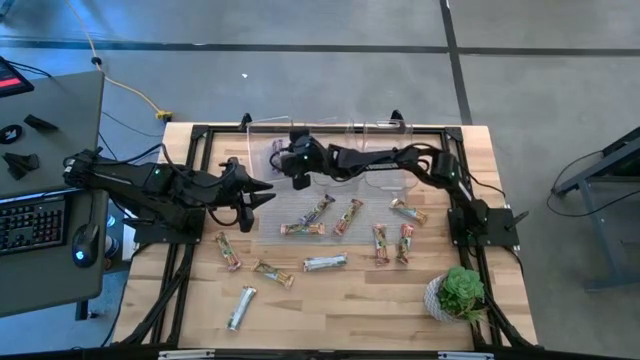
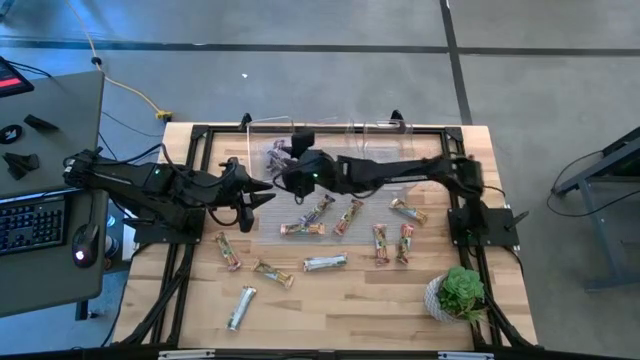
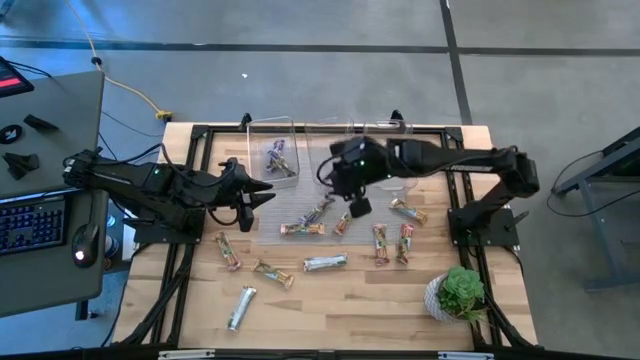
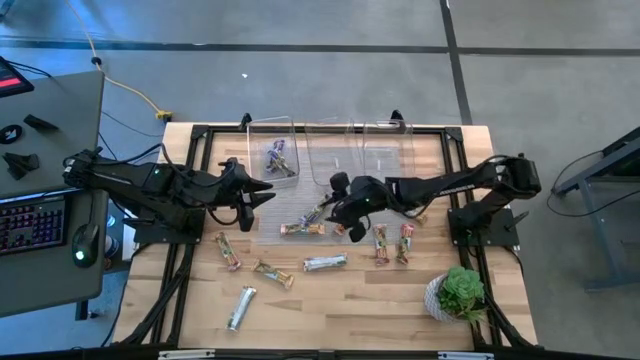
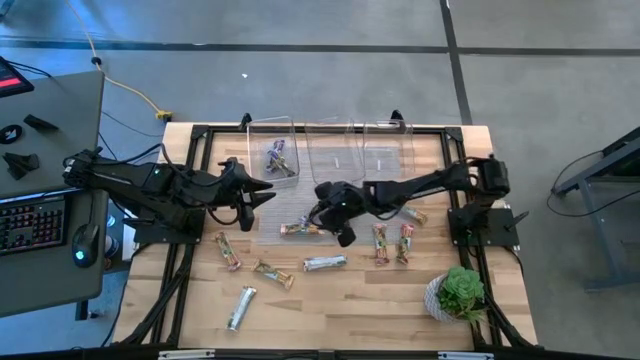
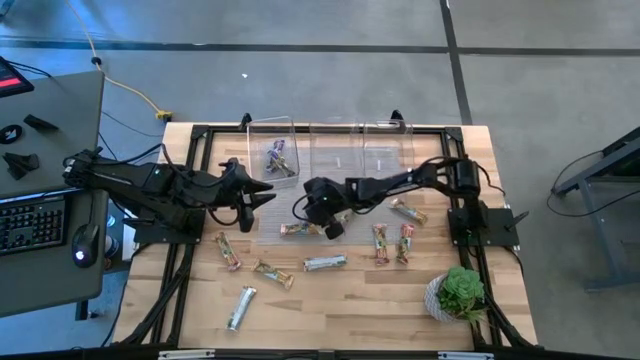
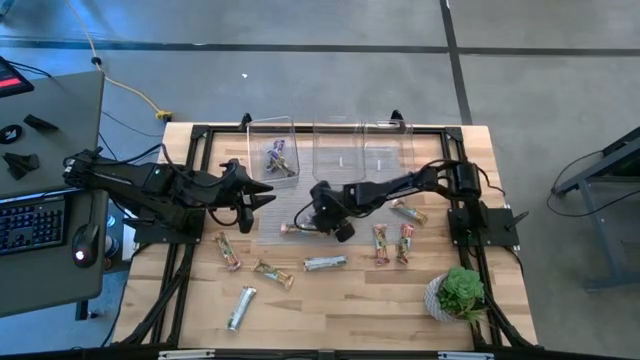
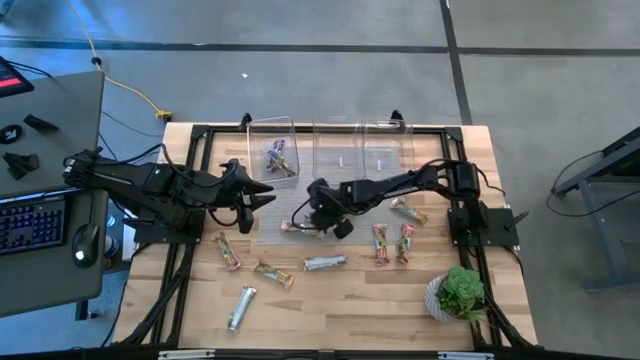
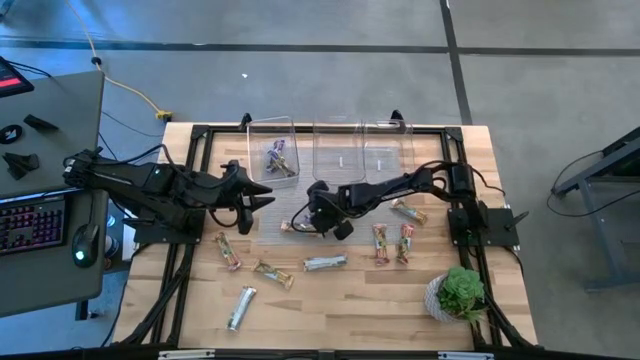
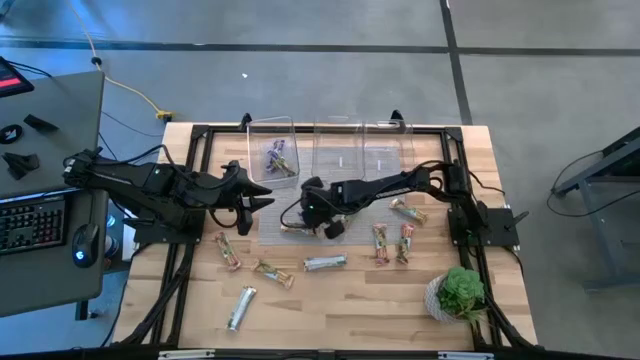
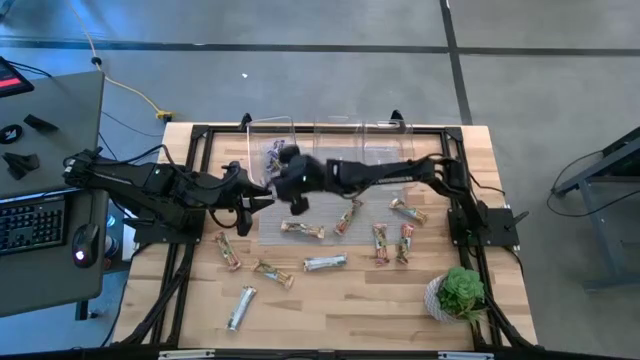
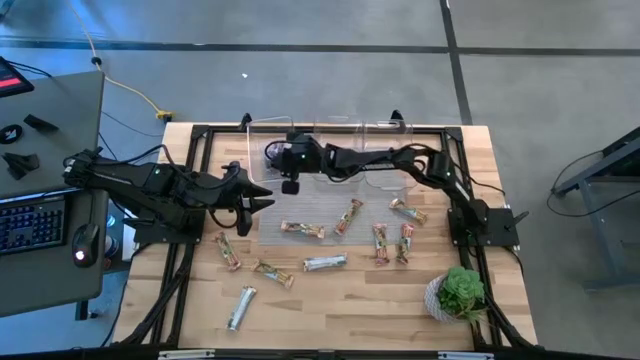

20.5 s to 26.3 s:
Task: Pick and place Granola Bars by type
Put the blue granola bar into the left transparent bin

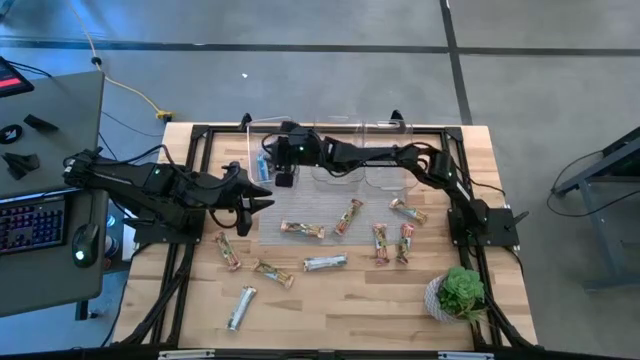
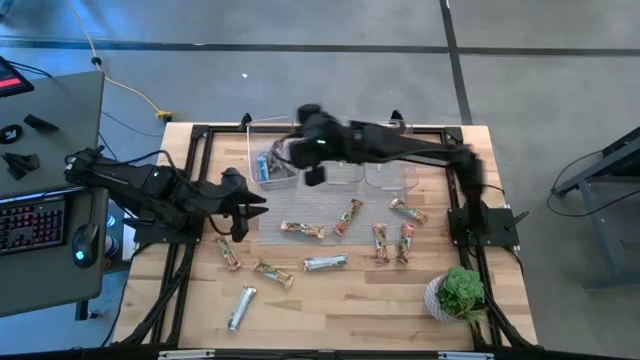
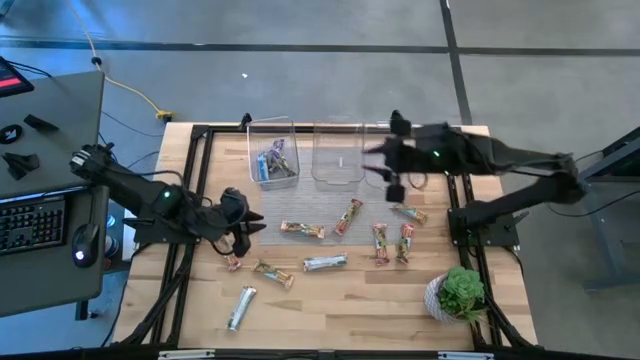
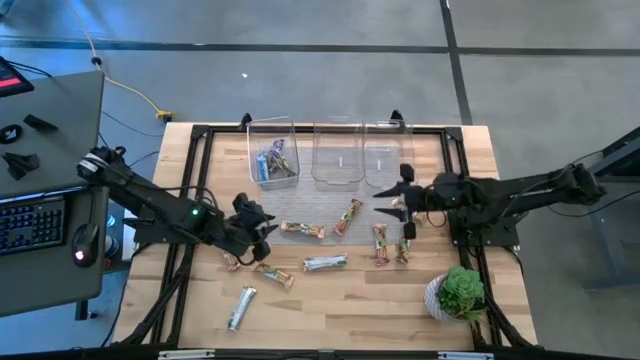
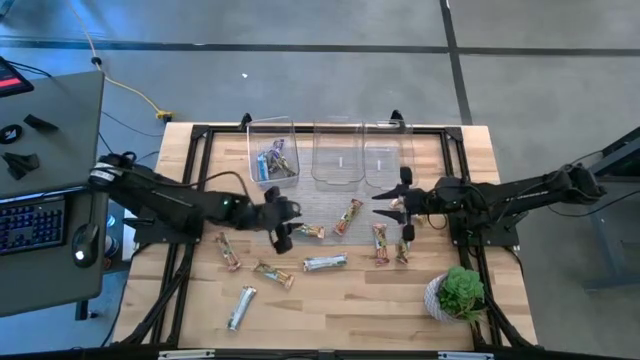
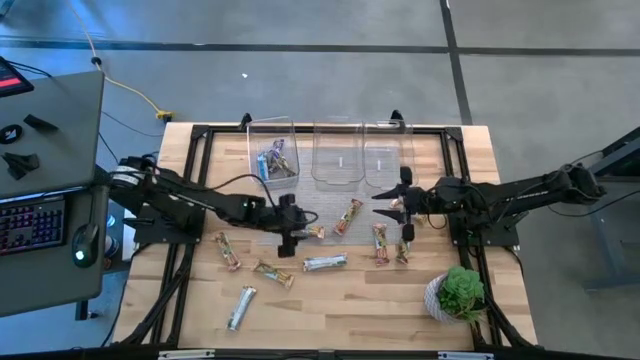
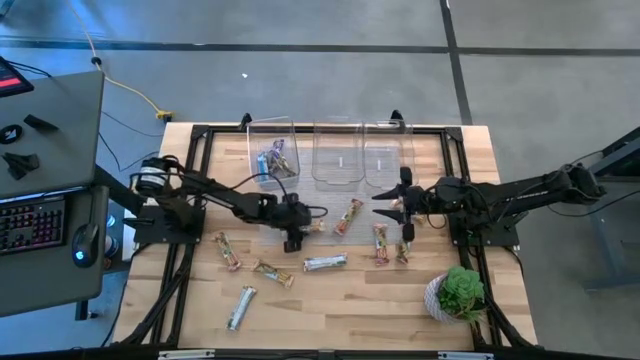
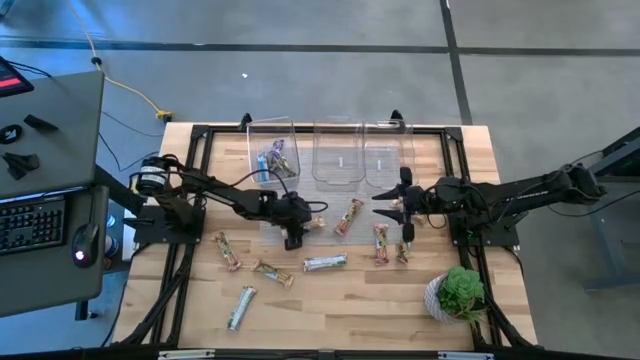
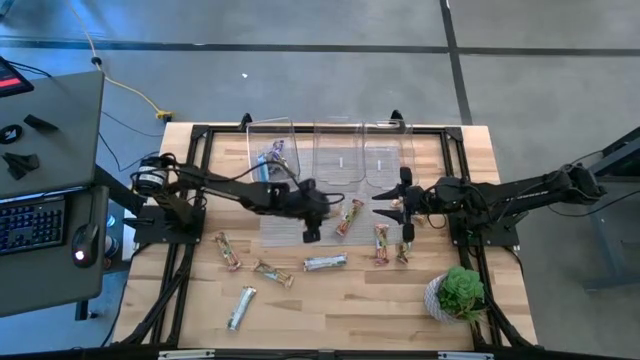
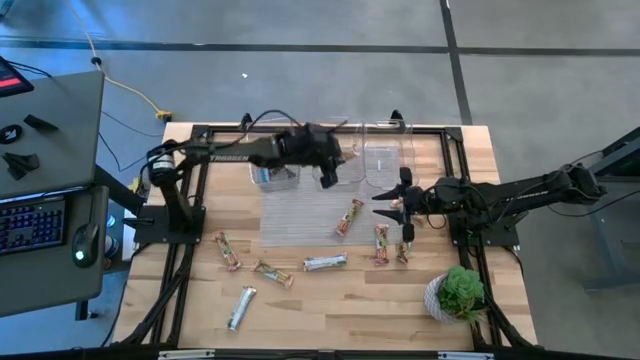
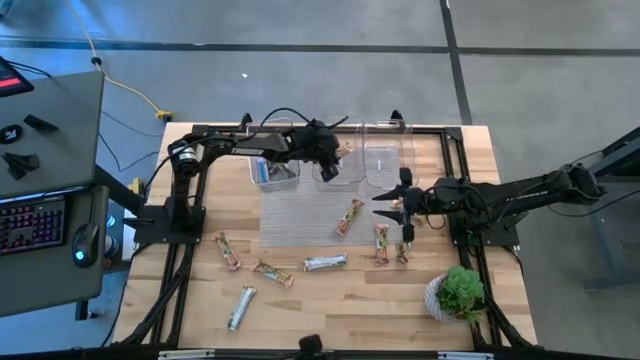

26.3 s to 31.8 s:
Put the yellow granola bar into the middle transparent bin

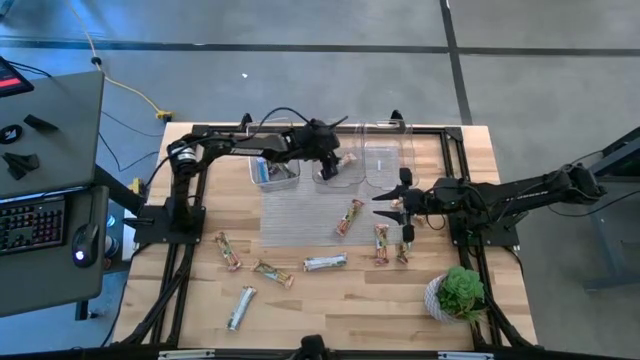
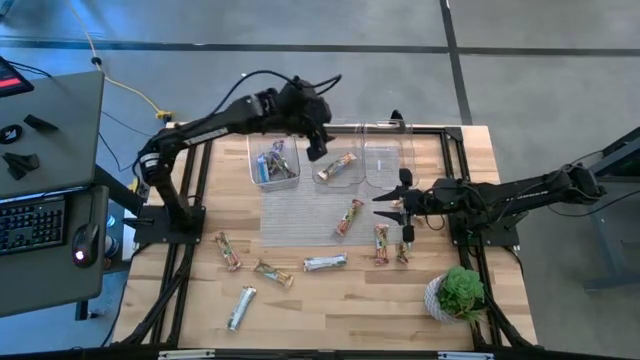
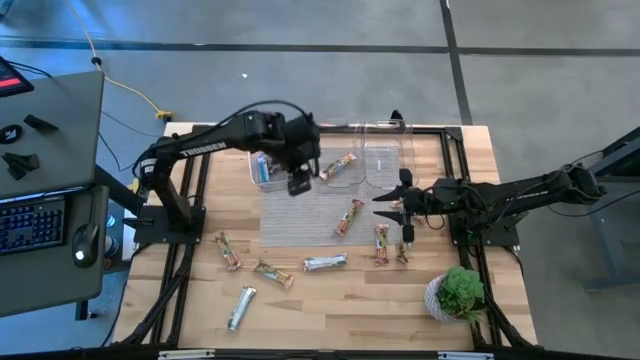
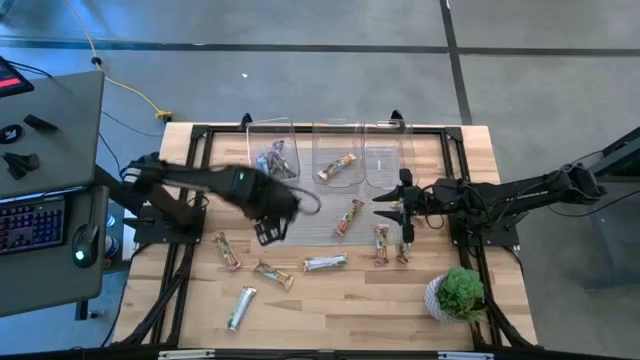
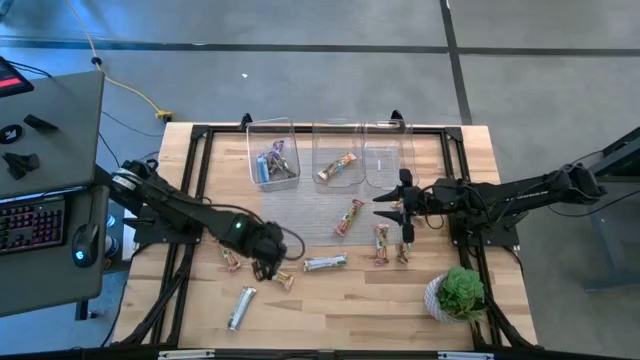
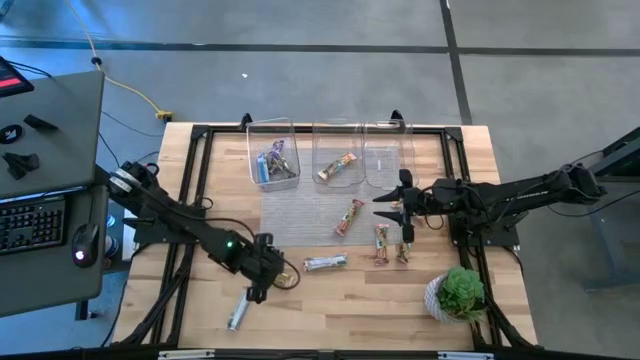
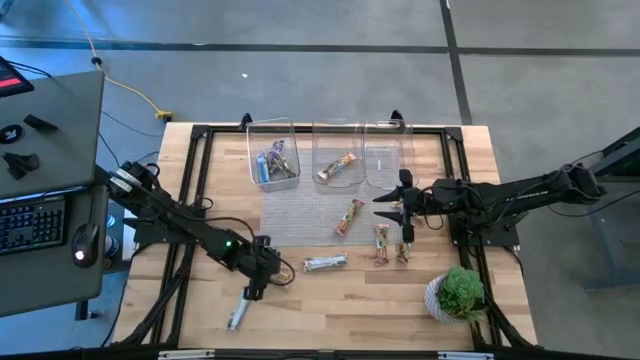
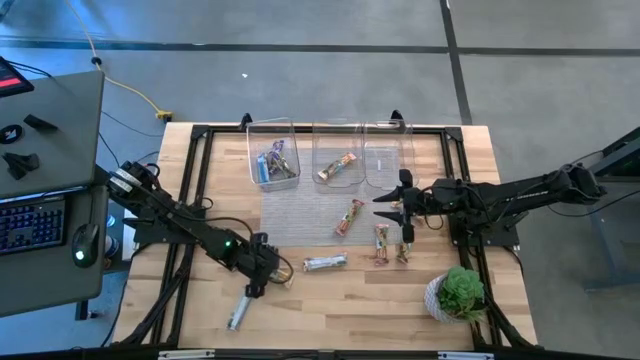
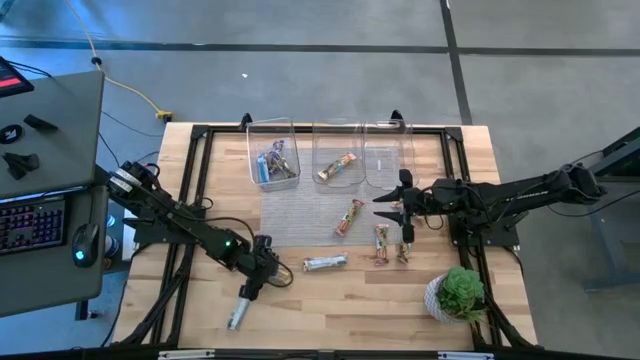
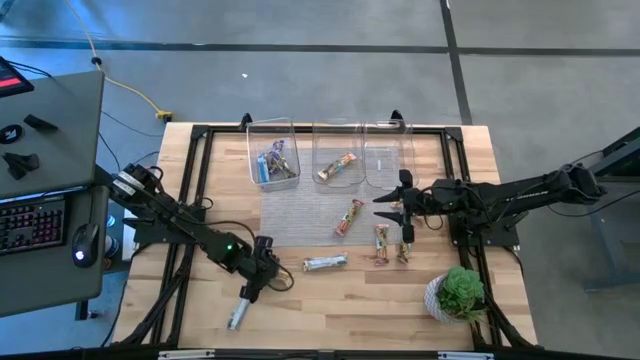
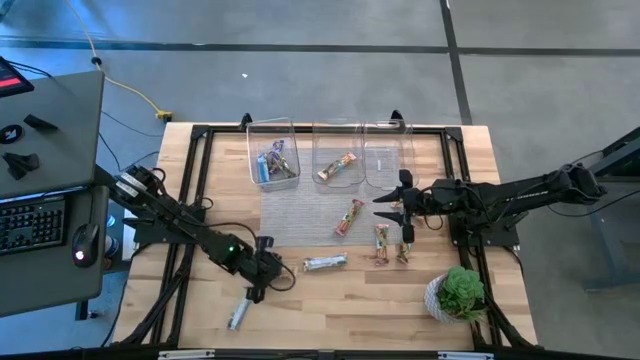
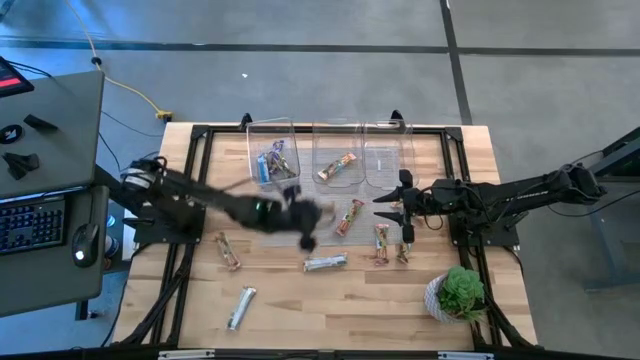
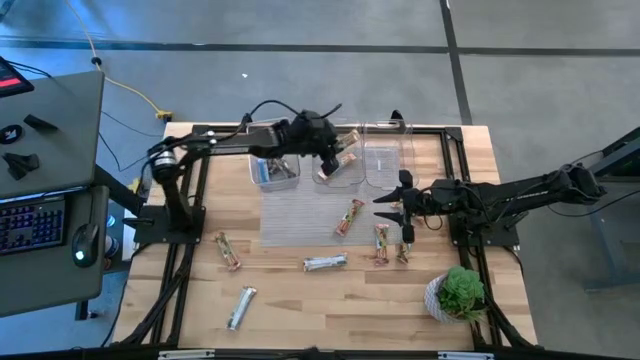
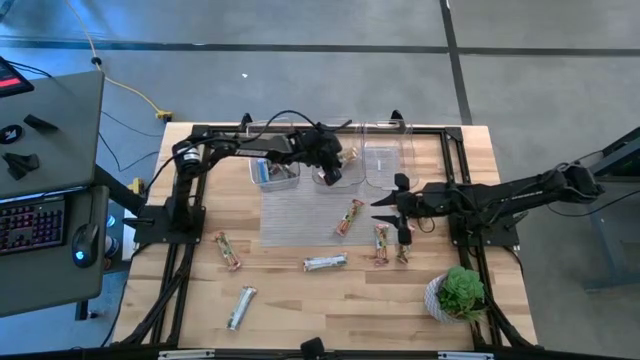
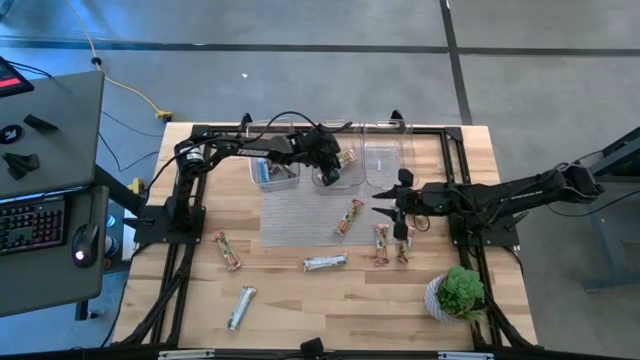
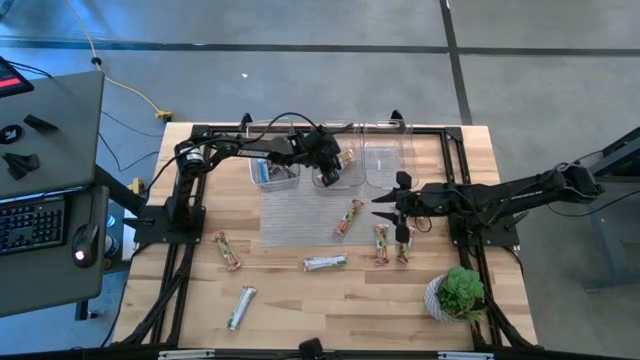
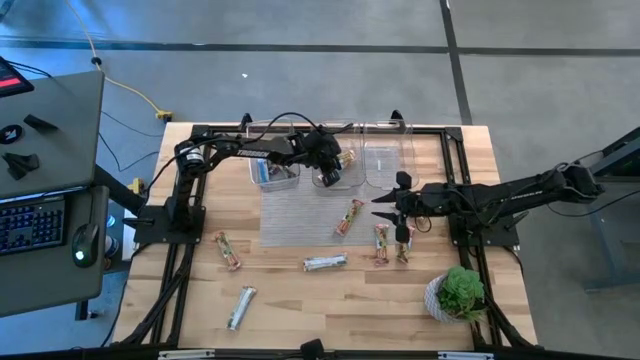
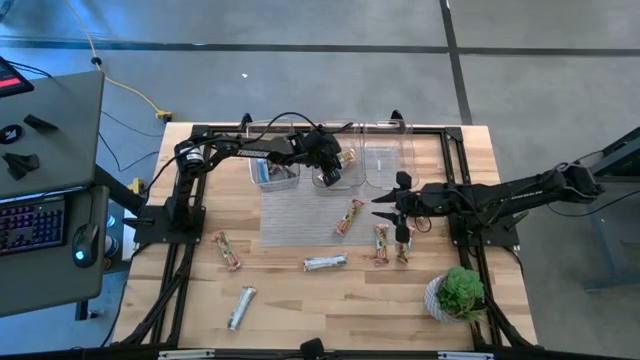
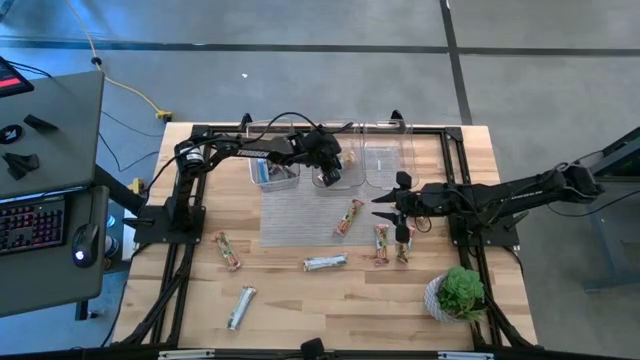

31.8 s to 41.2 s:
Put the yellow granola bar into the middle transparent bin
